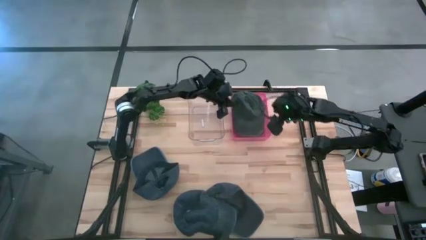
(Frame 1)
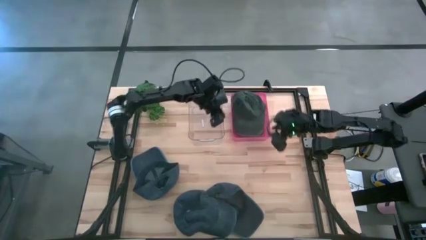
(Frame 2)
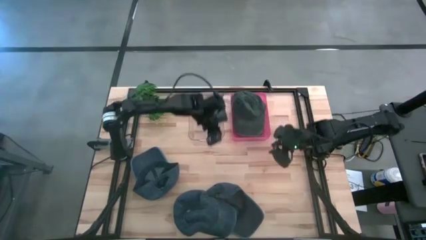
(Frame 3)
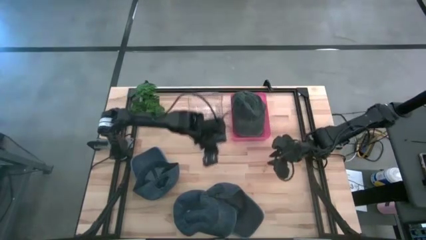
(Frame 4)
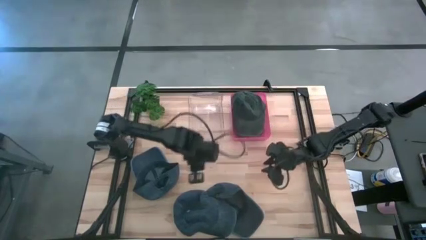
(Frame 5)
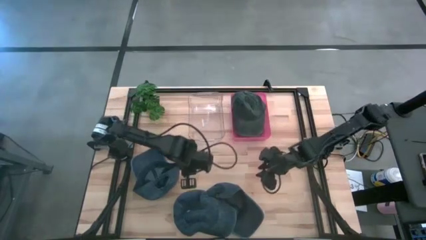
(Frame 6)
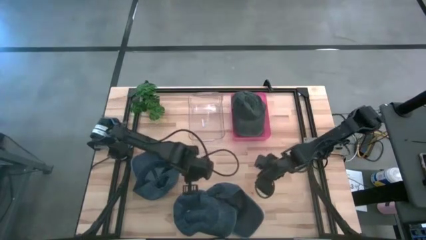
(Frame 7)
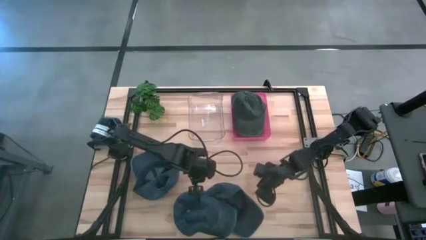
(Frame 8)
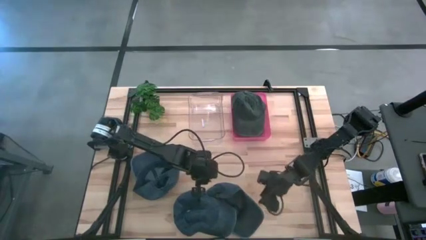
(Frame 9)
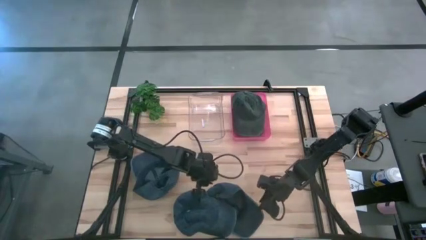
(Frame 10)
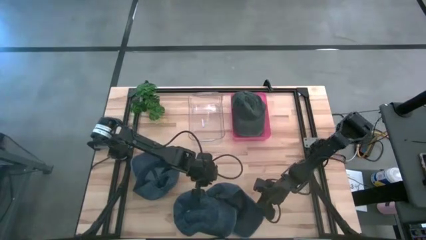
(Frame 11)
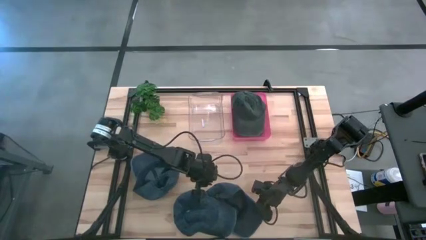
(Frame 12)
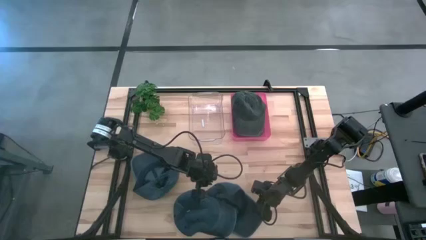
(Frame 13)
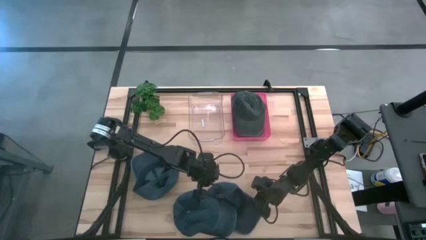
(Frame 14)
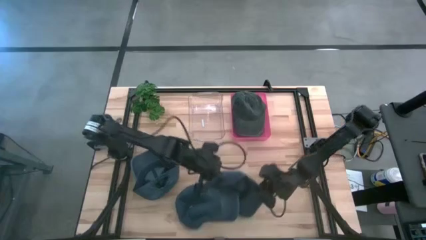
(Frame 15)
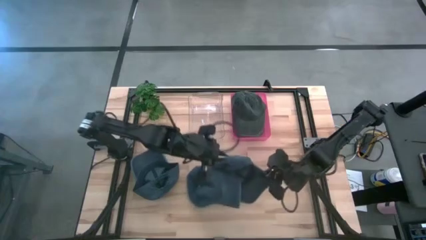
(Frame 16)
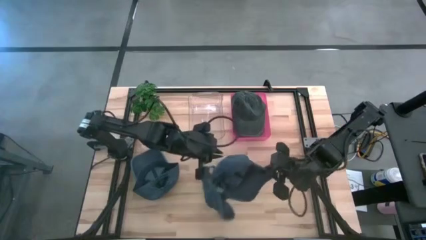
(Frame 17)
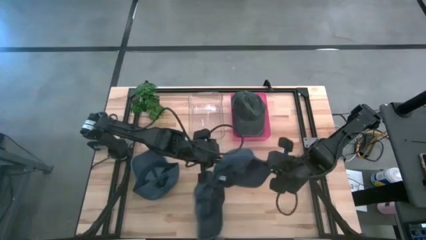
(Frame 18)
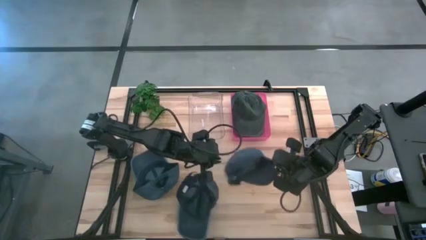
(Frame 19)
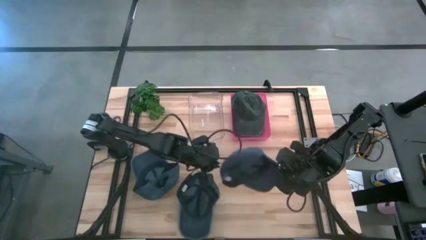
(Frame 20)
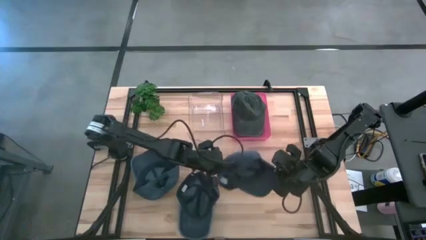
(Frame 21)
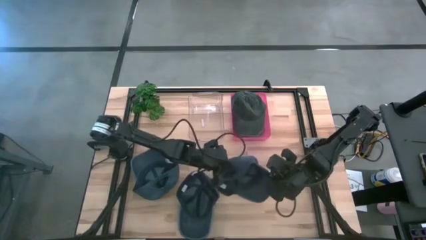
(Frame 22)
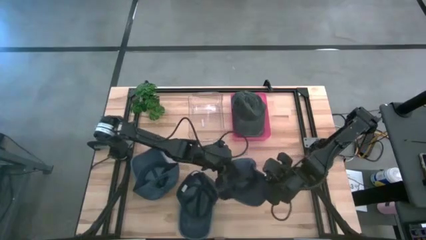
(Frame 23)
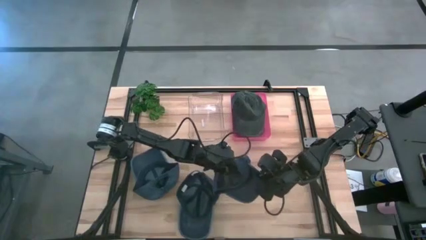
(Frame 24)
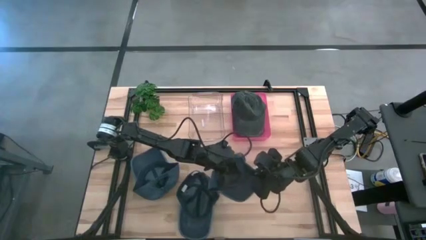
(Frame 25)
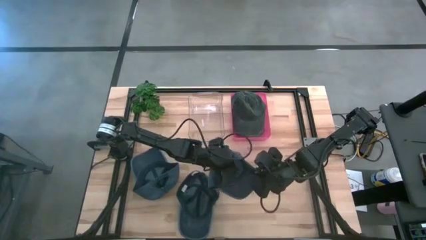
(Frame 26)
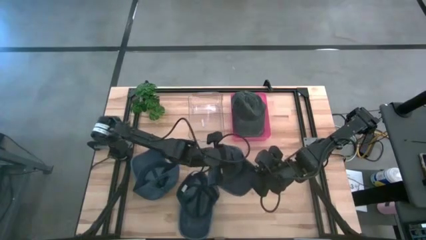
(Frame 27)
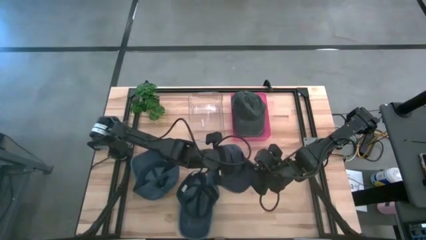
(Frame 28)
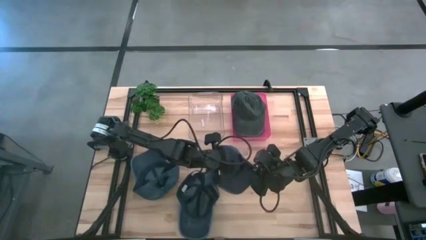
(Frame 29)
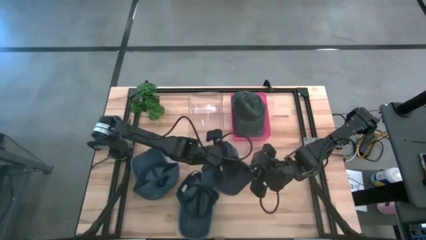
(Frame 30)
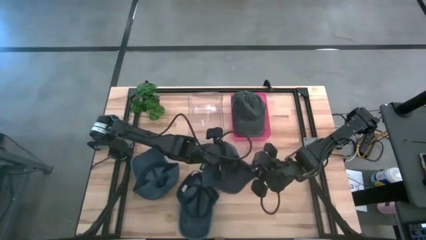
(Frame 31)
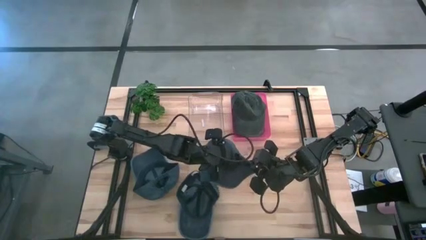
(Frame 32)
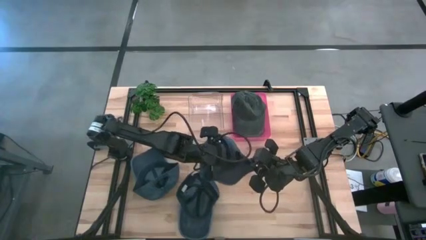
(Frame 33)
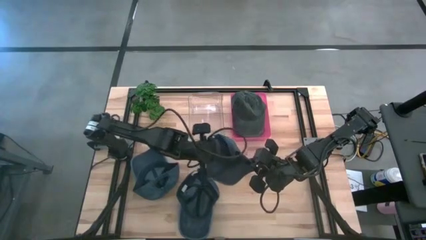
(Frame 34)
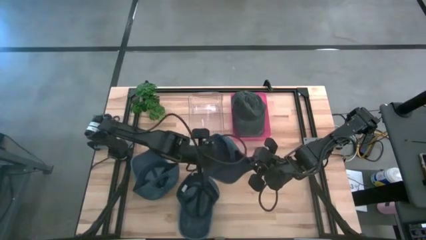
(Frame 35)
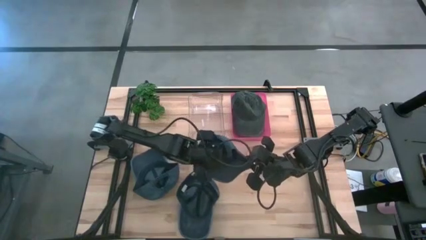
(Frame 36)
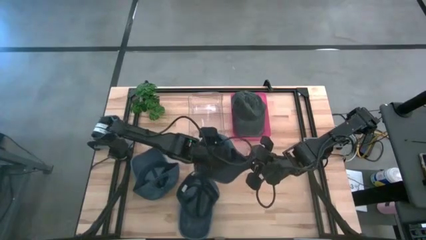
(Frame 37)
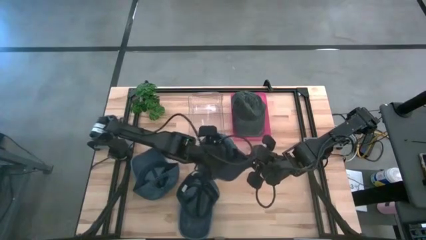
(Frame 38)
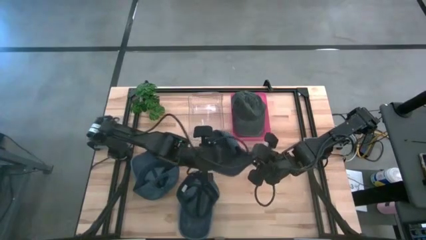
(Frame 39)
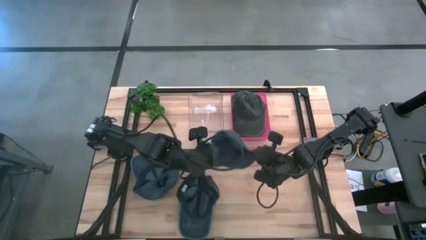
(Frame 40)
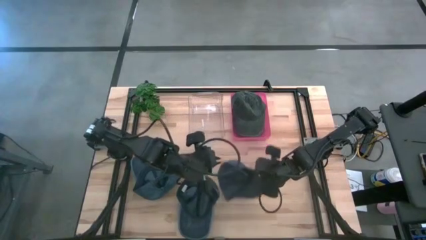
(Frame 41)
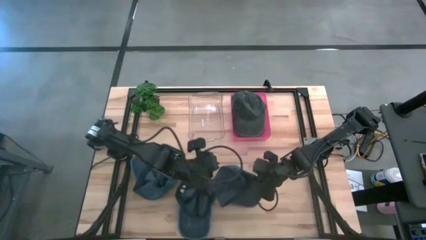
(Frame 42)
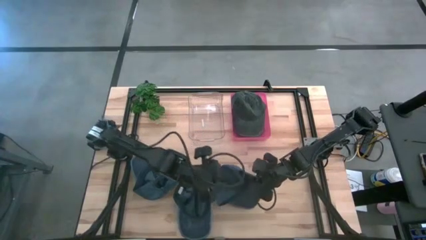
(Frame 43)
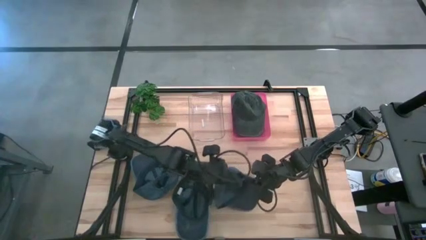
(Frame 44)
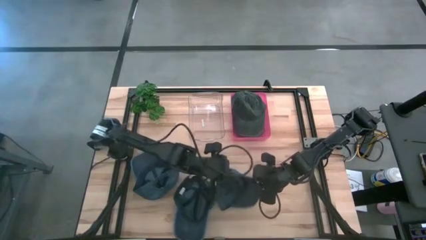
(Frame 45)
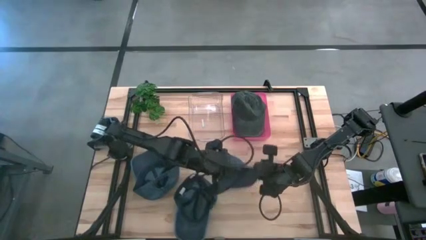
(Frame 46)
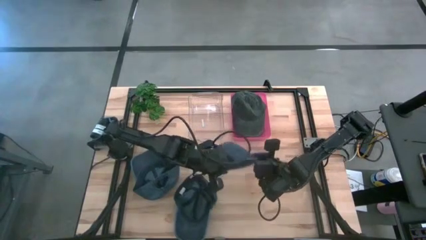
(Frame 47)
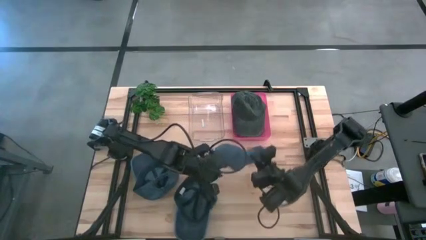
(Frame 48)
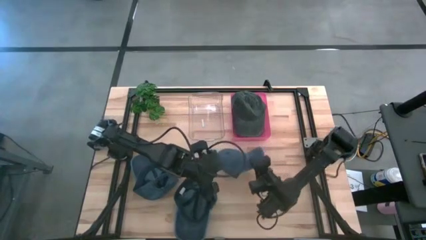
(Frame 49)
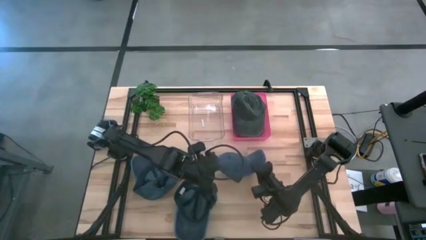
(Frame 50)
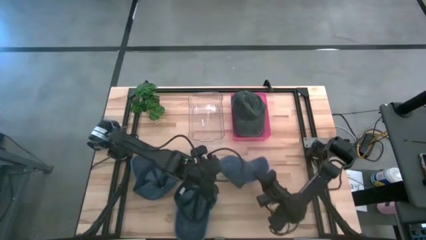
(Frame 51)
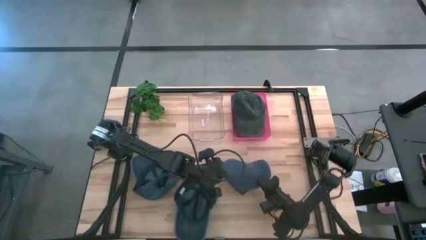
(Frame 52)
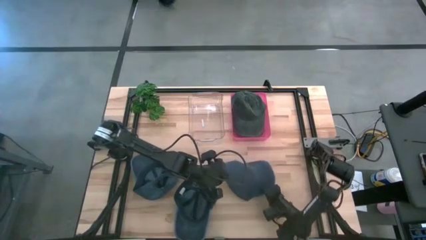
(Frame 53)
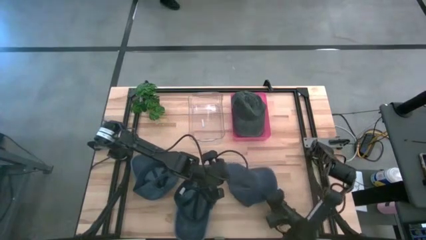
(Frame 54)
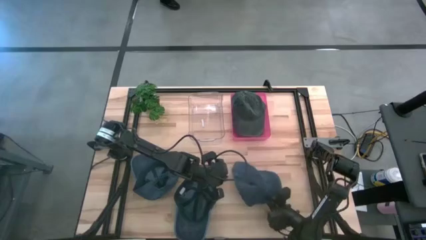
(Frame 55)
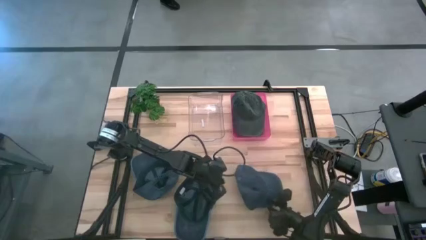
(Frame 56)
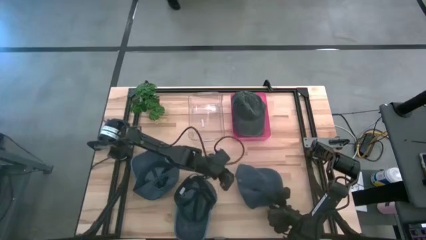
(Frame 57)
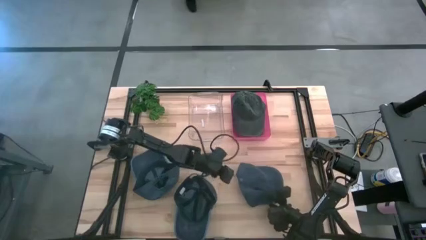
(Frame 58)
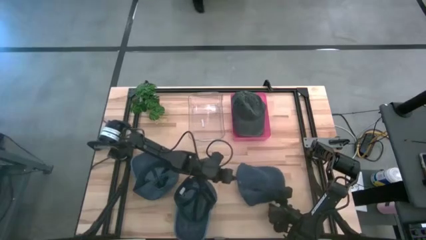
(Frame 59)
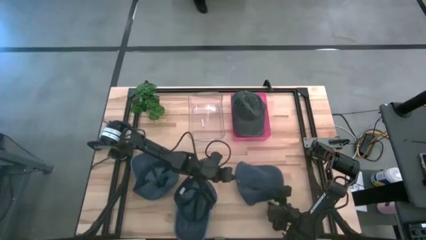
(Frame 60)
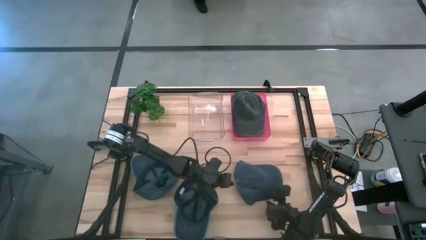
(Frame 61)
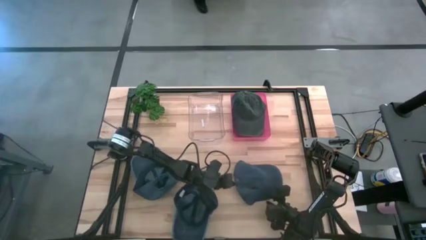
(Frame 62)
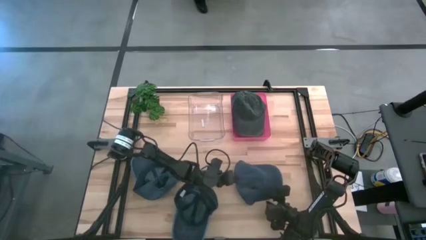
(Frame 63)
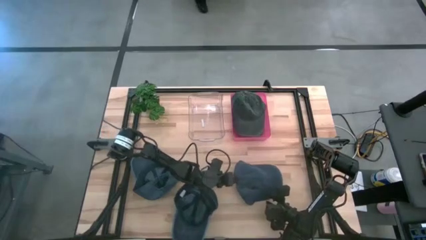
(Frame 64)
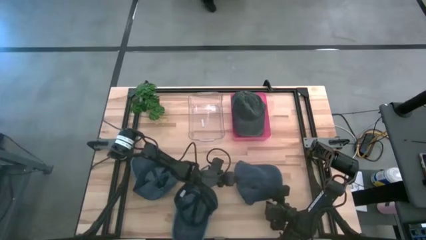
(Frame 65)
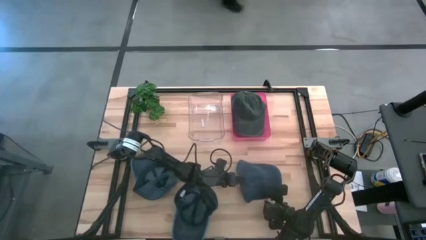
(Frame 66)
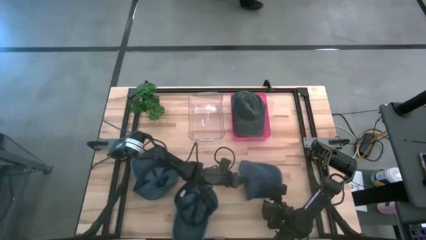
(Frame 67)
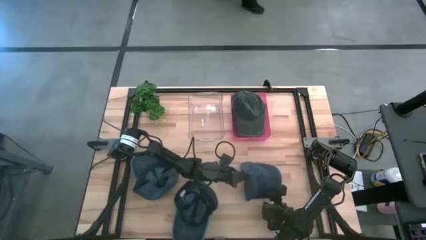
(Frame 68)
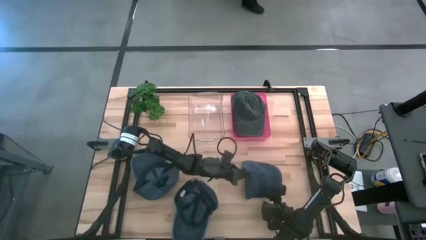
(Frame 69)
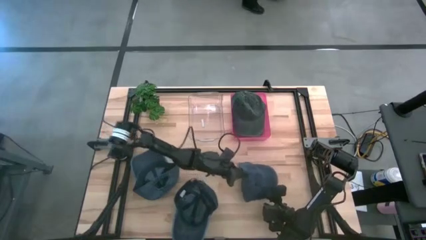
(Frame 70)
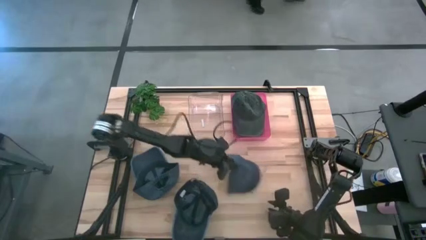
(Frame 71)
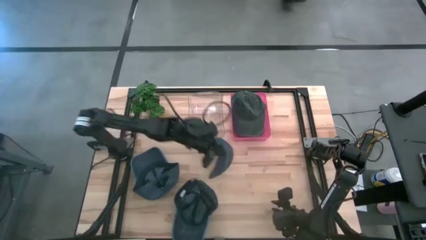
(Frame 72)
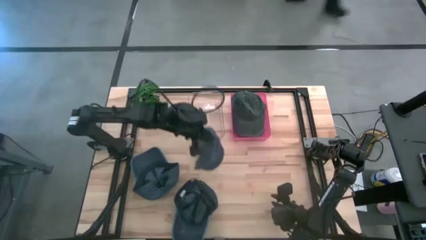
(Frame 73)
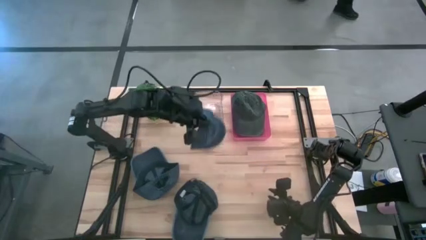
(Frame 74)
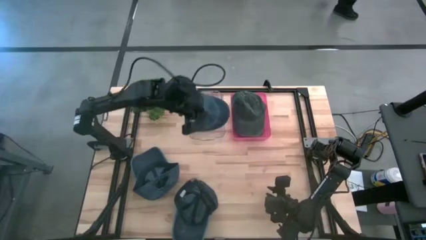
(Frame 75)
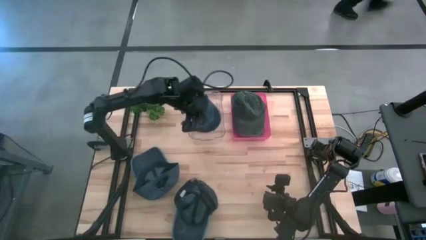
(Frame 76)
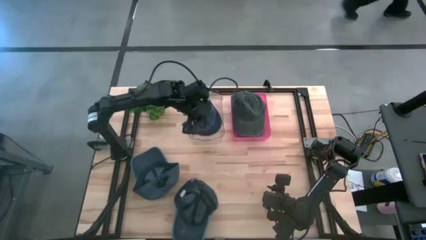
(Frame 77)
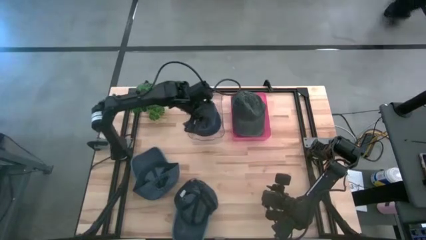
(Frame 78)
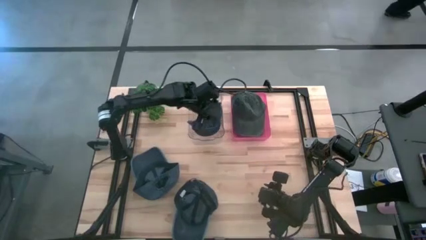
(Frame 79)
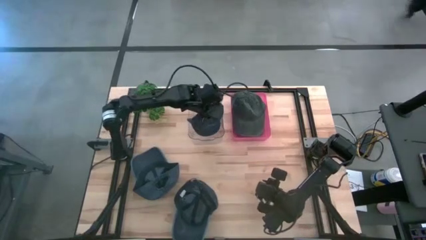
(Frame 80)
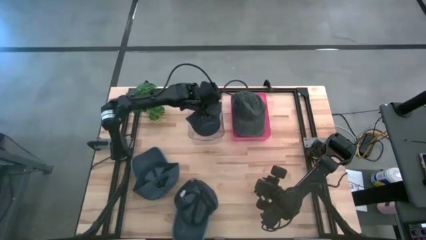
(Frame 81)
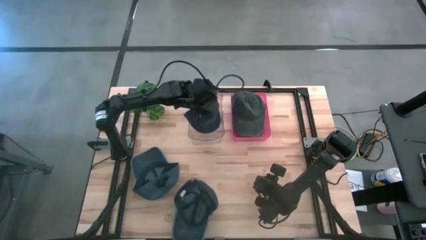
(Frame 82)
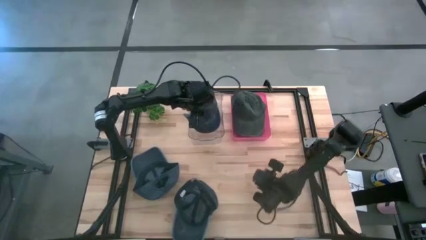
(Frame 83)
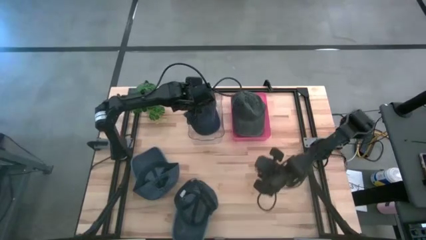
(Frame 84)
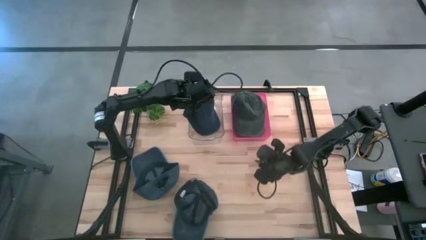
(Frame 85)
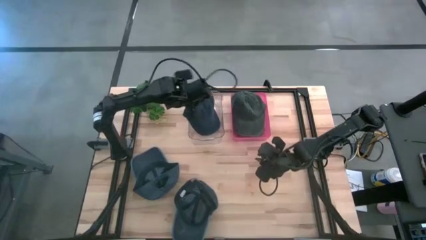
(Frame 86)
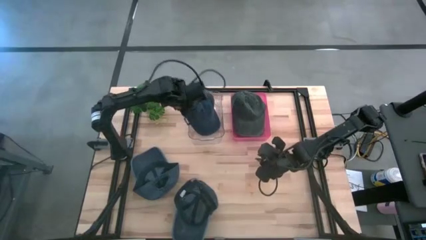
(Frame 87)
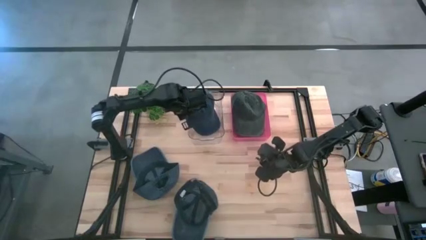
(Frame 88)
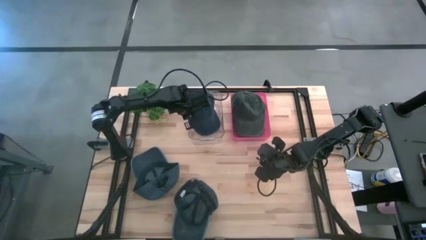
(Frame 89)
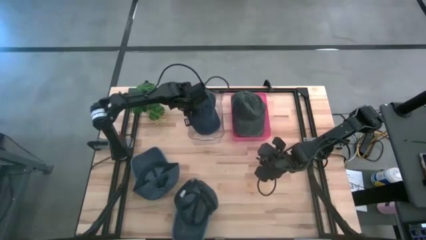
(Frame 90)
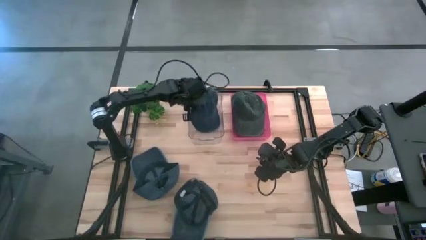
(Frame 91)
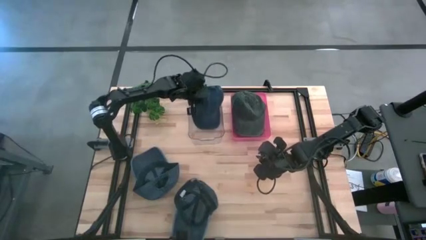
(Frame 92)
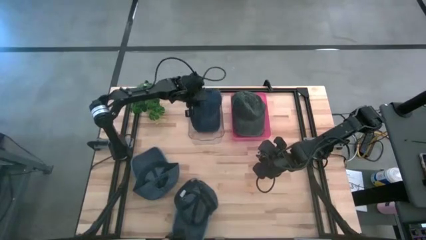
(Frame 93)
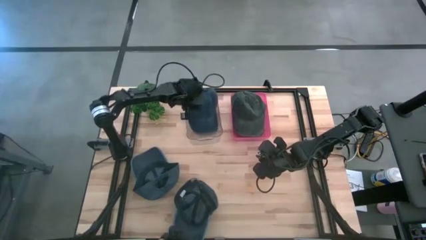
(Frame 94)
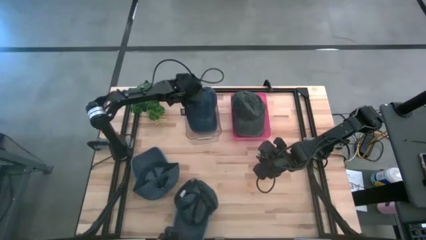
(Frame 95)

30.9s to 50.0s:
Task: Pick & Place hat
Put the right blue cap into the transparent bin
